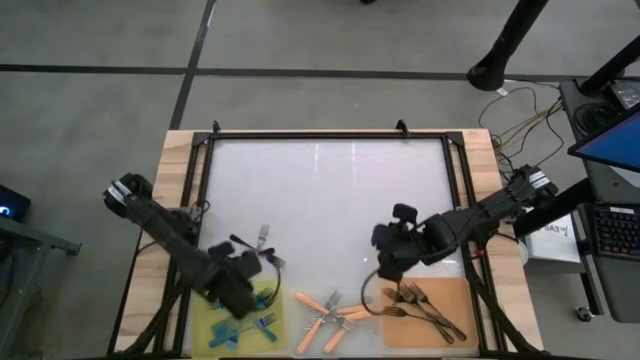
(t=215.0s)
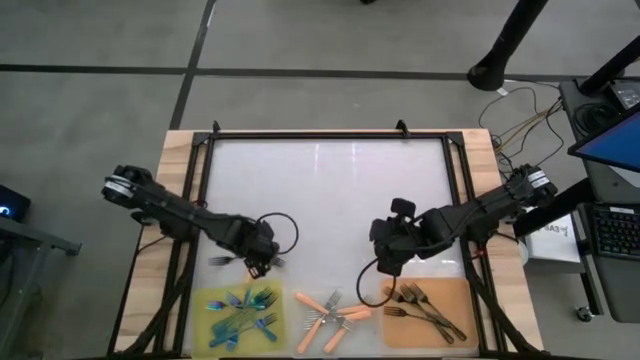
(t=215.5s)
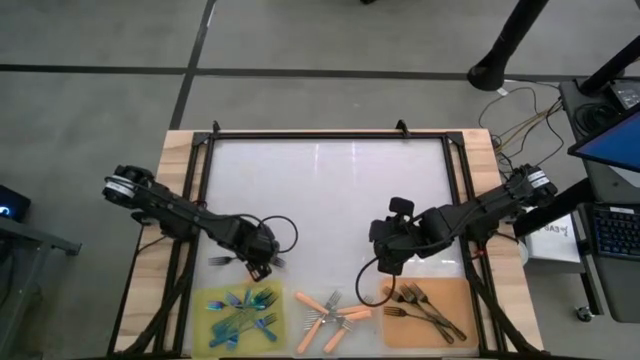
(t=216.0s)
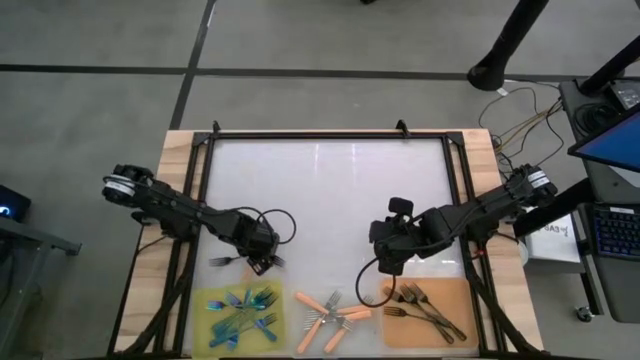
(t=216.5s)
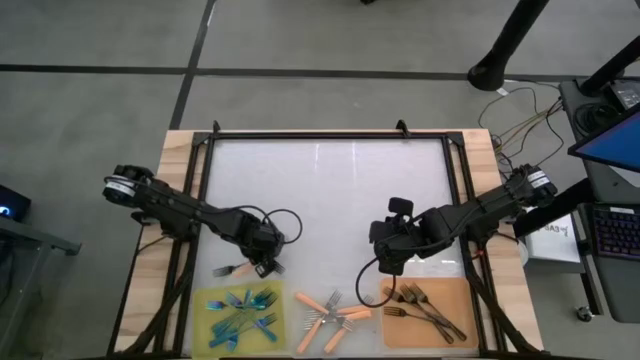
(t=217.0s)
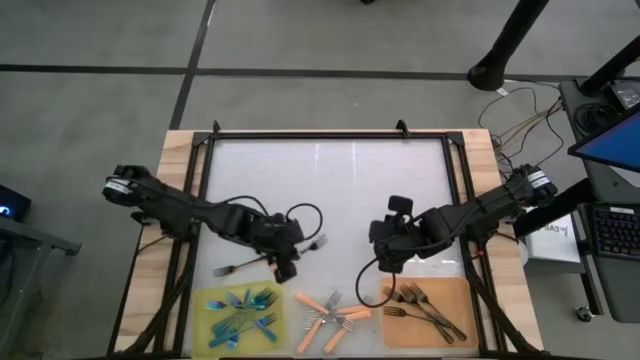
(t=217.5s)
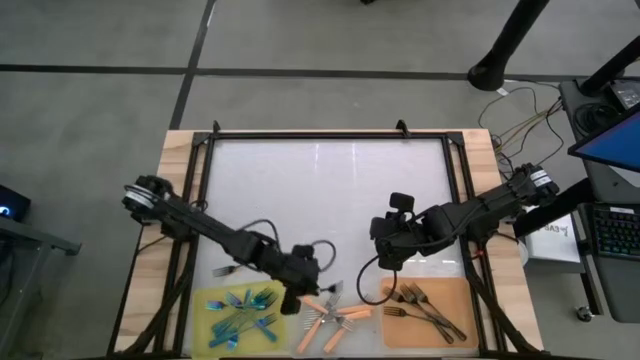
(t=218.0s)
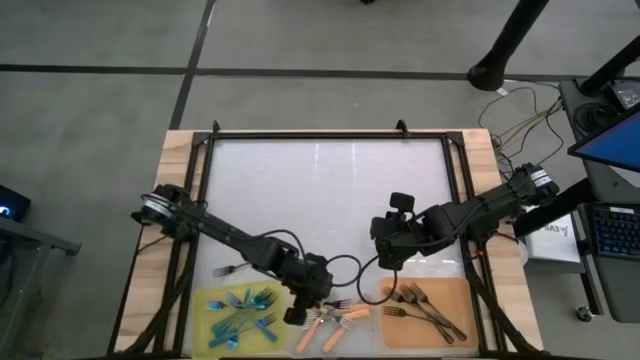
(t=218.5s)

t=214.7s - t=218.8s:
Task: Sort silverware by color (type)
Put the orange fork into the transparent bin

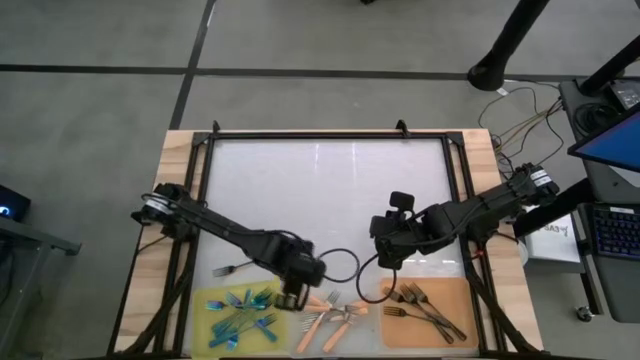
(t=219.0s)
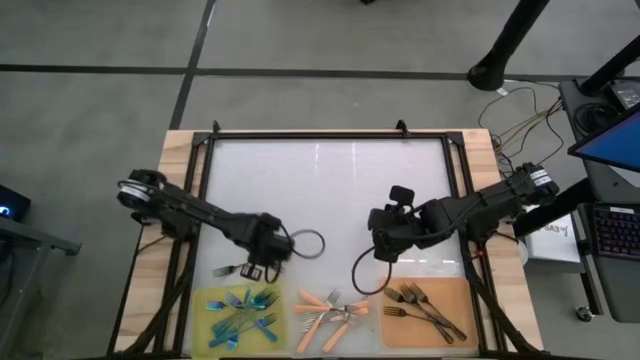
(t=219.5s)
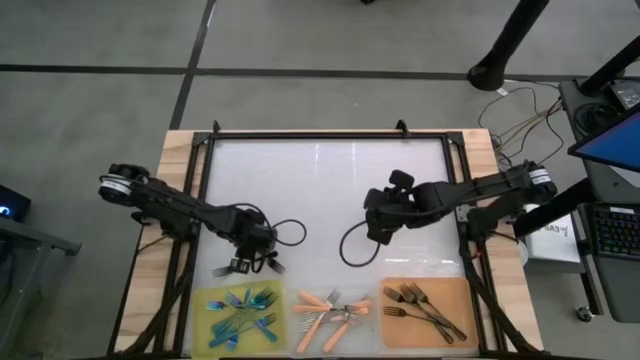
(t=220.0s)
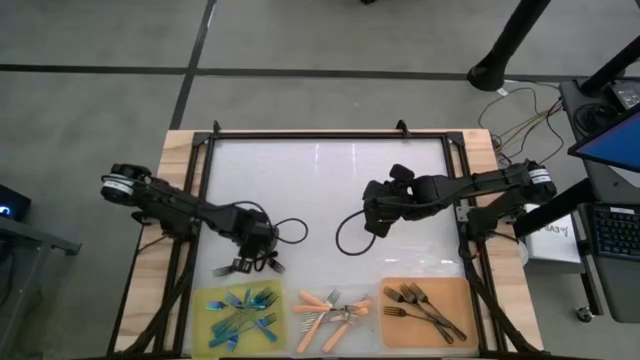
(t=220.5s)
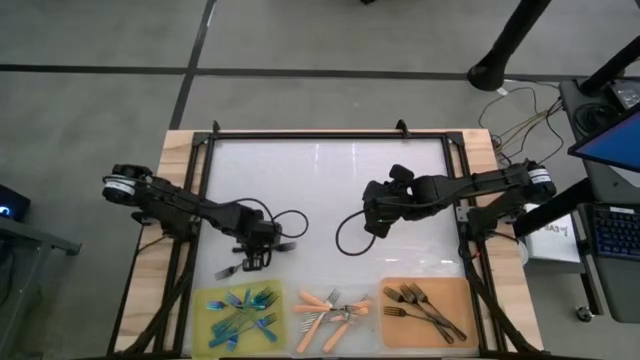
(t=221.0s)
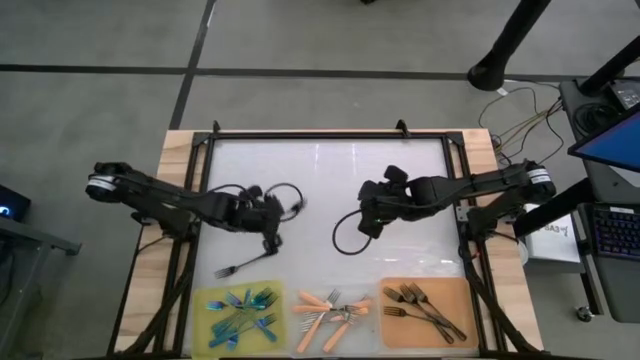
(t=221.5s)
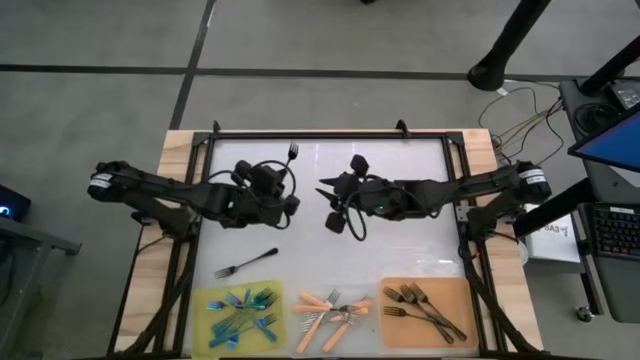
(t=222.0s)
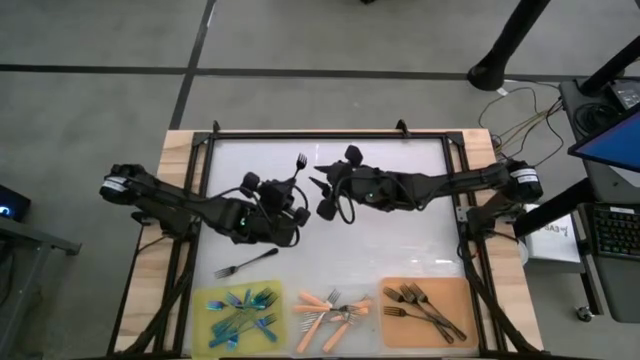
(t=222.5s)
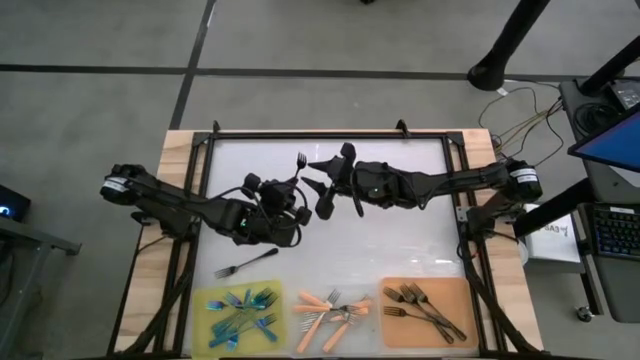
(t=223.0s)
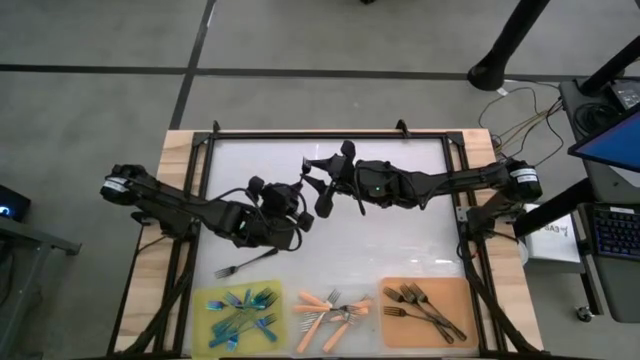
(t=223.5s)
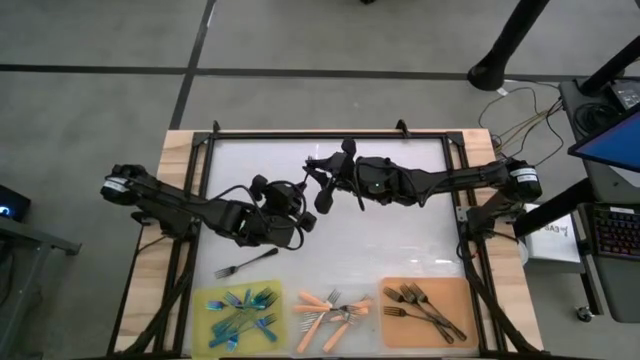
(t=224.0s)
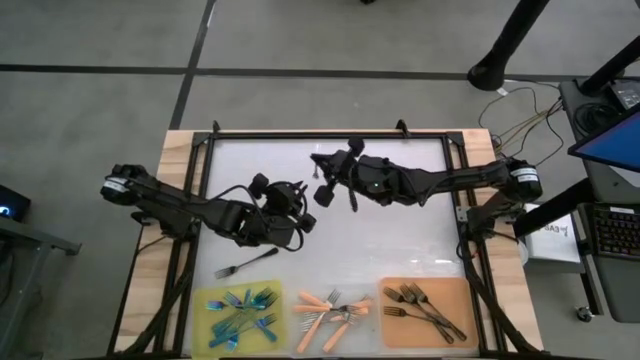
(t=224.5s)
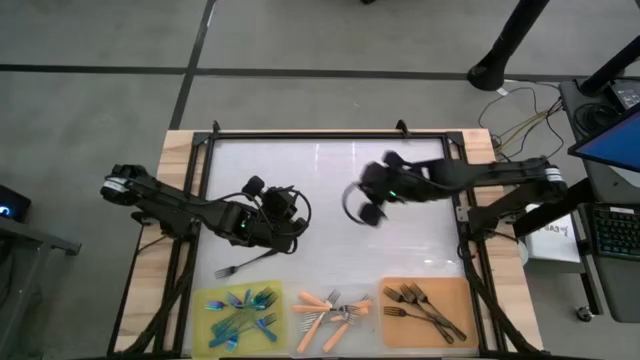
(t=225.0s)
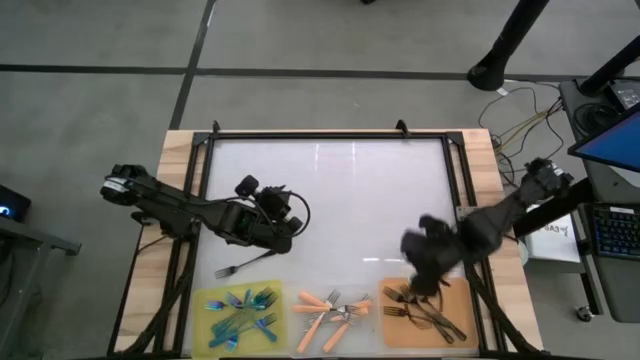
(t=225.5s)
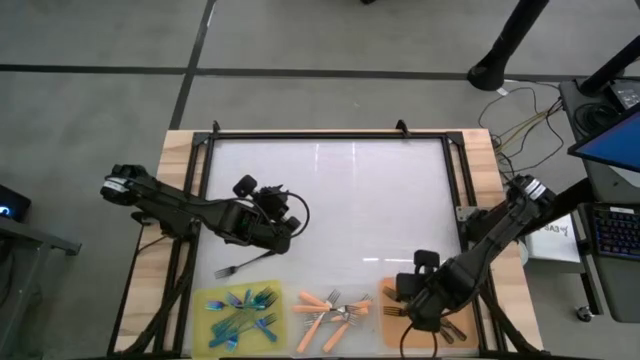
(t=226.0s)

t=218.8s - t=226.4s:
Put the black fork into the orange bin

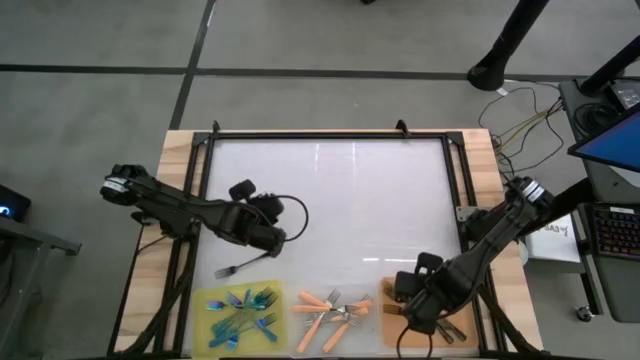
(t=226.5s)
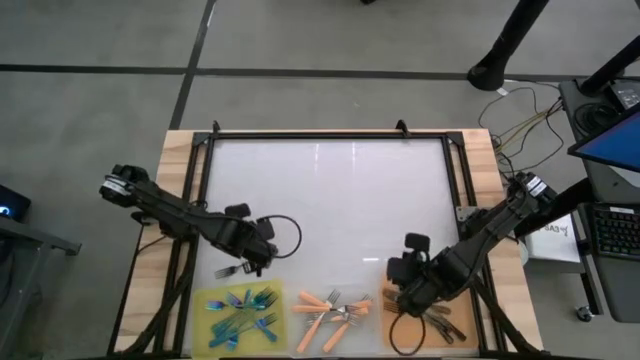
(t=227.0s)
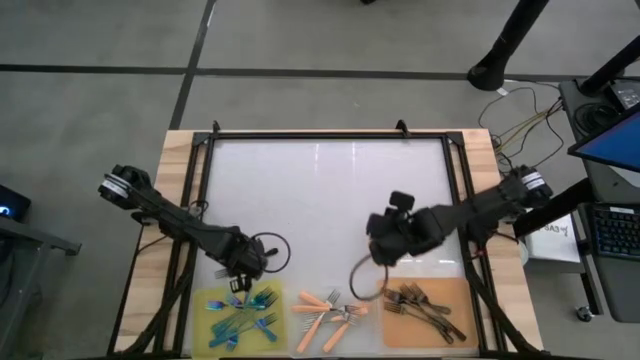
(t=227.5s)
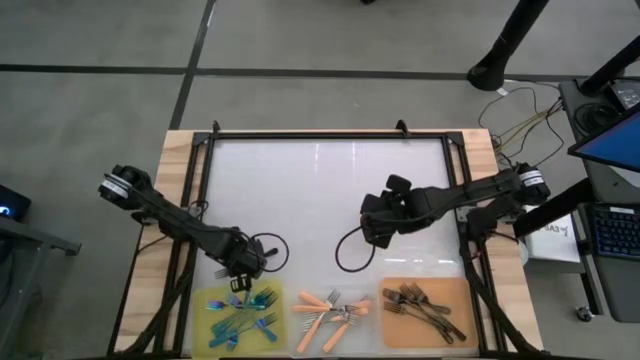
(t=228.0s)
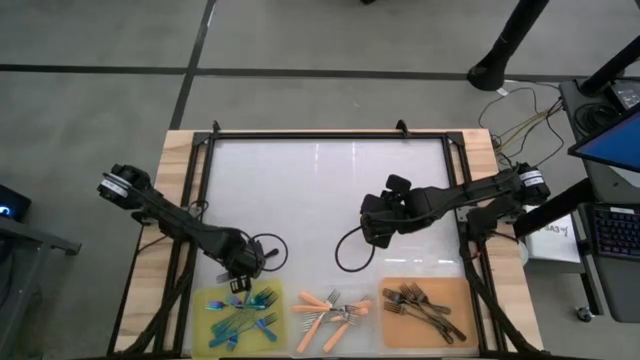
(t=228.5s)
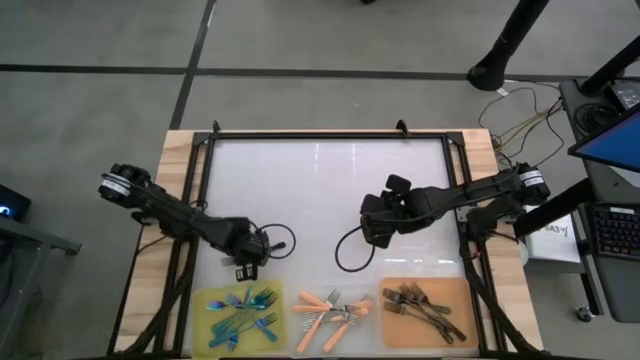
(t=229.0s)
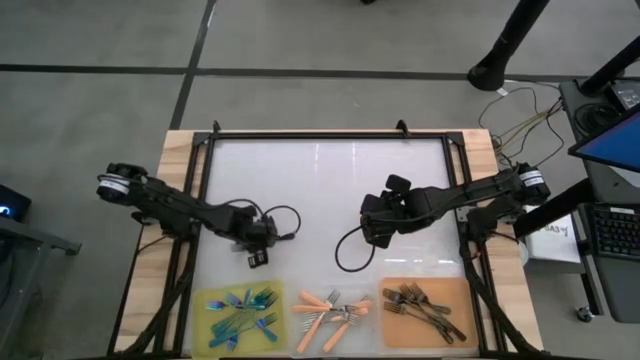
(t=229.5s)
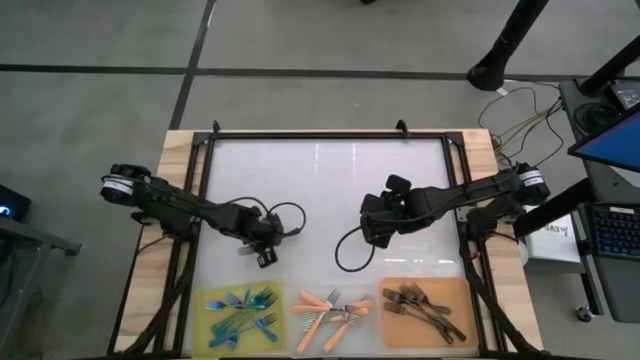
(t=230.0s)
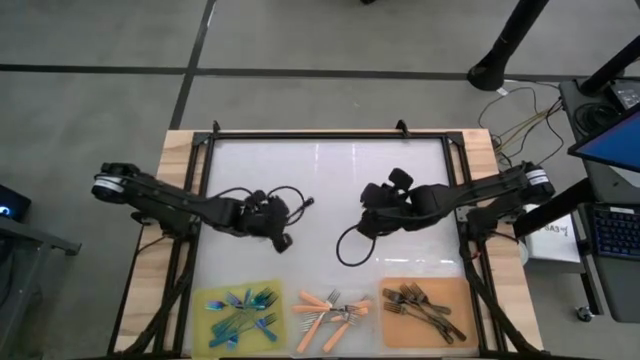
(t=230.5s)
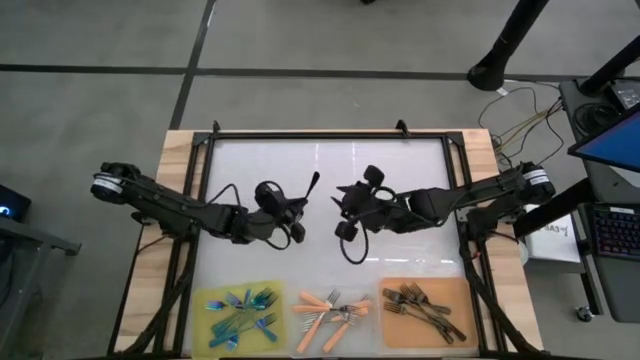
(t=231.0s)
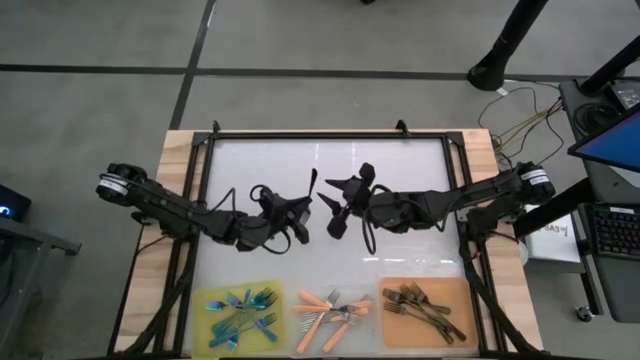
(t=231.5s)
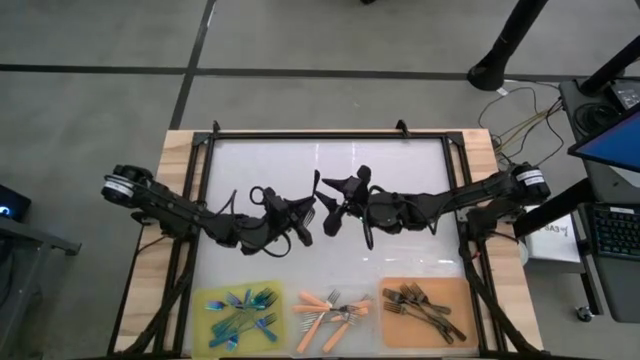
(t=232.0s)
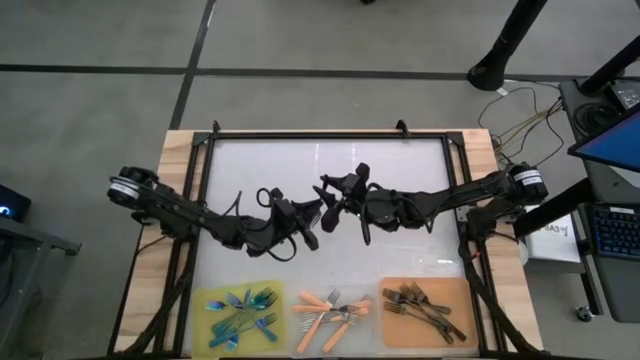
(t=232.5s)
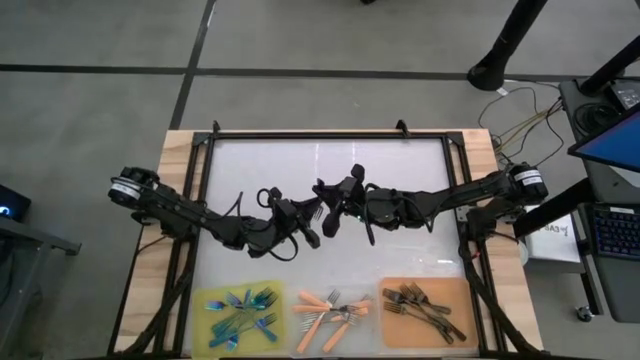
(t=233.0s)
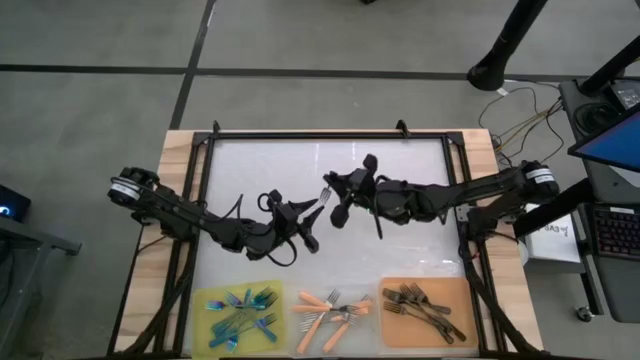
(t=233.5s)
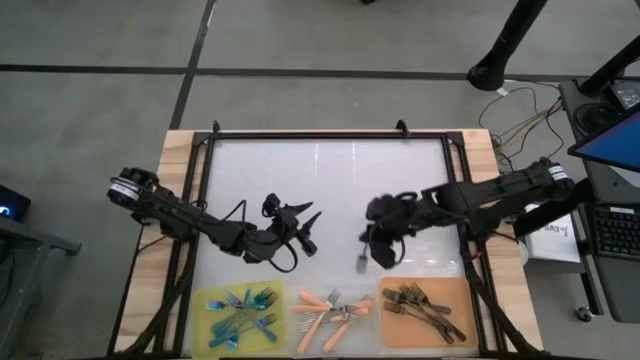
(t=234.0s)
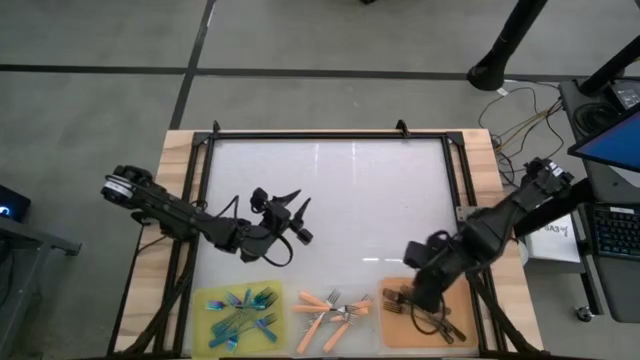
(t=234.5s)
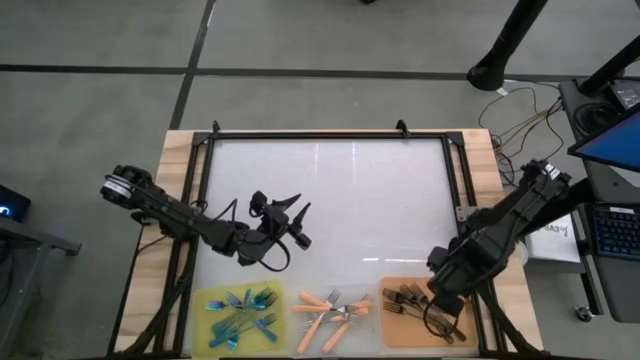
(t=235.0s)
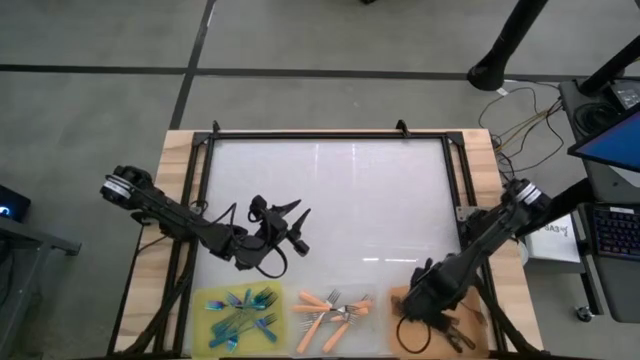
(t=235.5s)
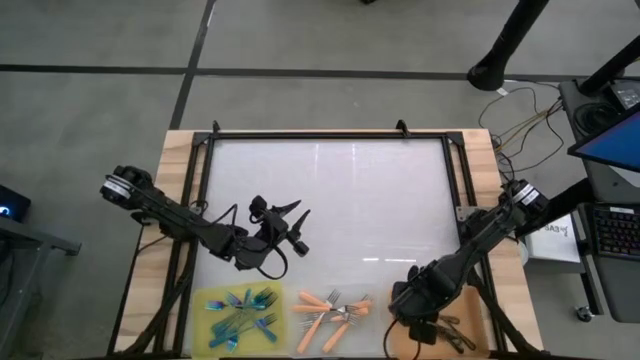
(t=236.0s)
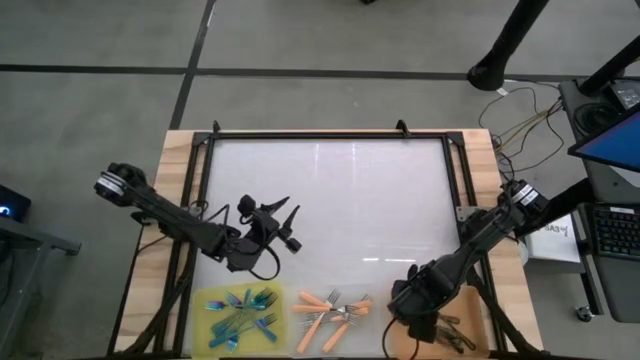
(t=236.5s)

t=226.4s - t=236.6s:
Put the black fork into the orange bin
